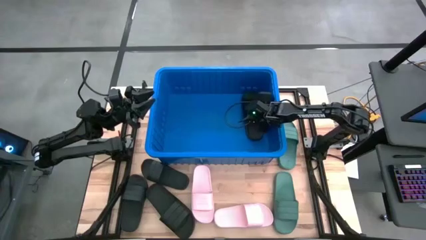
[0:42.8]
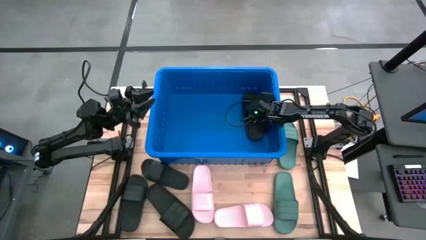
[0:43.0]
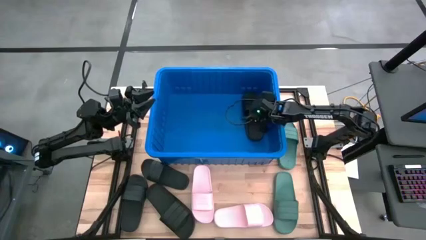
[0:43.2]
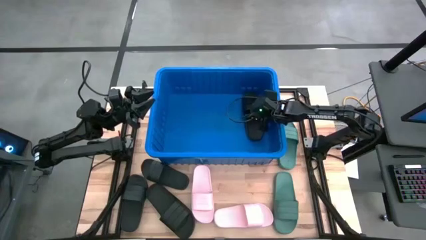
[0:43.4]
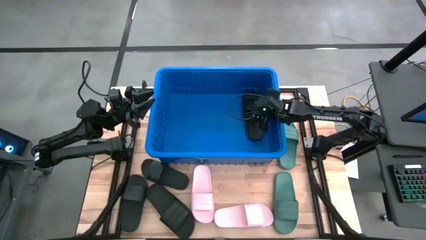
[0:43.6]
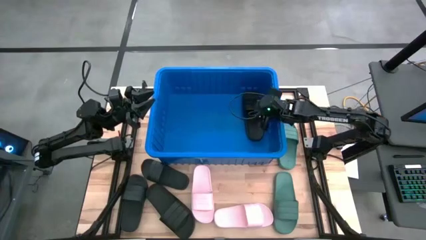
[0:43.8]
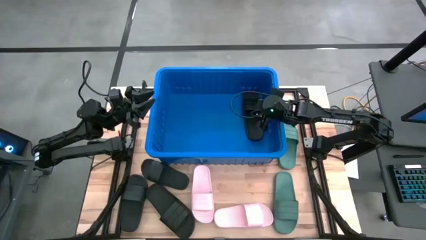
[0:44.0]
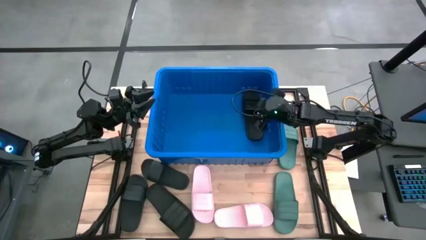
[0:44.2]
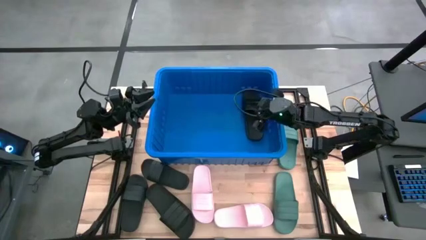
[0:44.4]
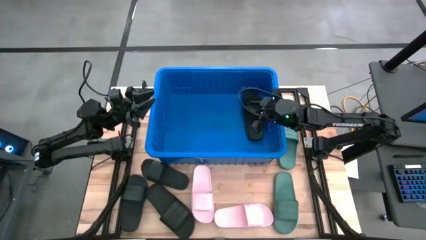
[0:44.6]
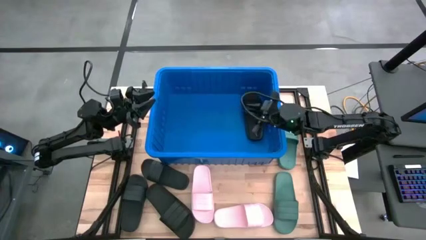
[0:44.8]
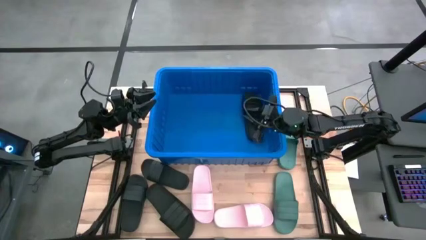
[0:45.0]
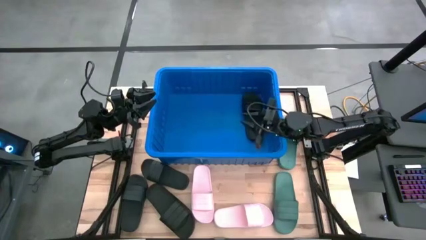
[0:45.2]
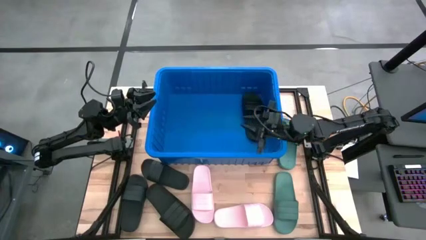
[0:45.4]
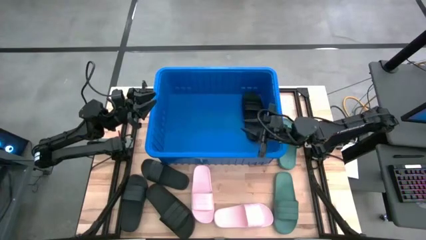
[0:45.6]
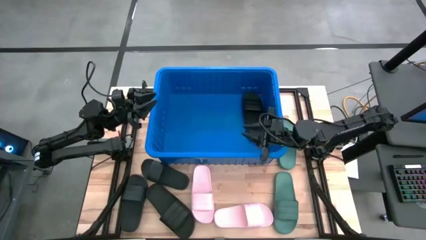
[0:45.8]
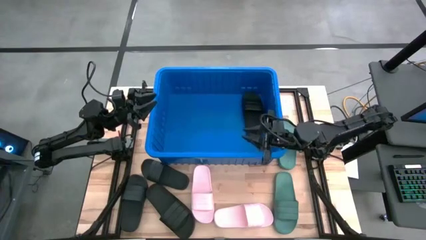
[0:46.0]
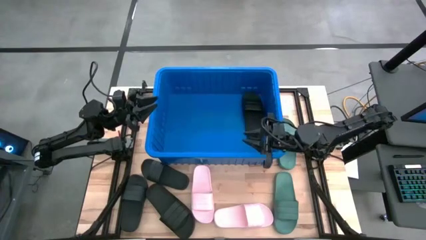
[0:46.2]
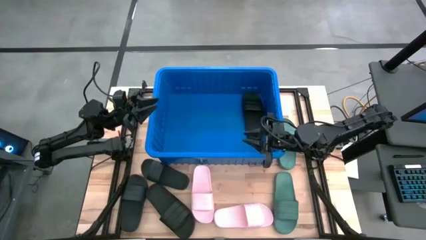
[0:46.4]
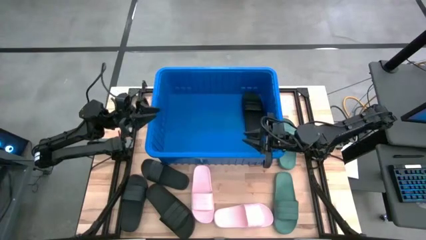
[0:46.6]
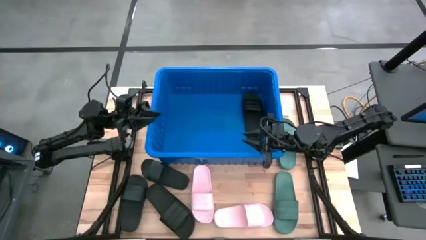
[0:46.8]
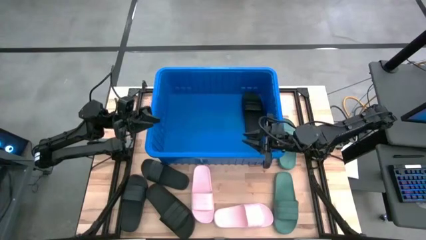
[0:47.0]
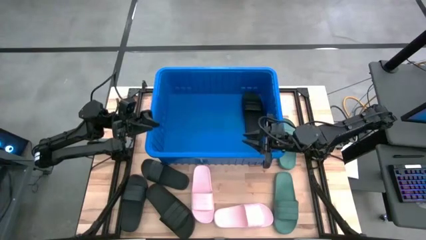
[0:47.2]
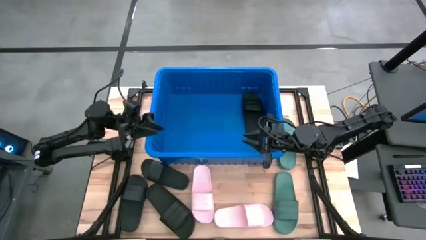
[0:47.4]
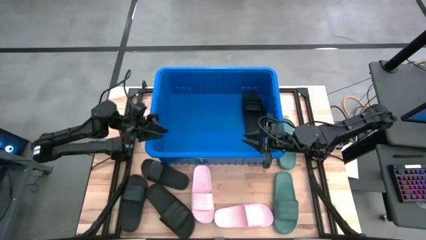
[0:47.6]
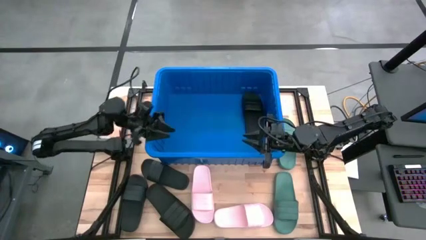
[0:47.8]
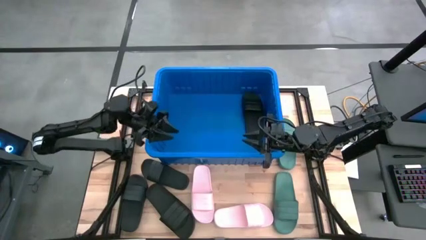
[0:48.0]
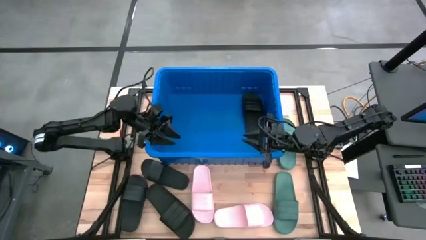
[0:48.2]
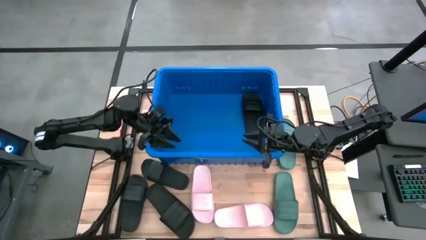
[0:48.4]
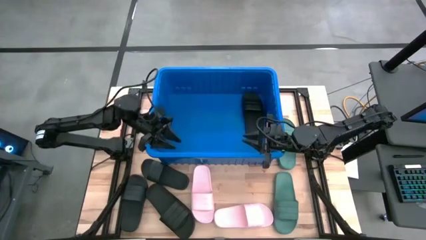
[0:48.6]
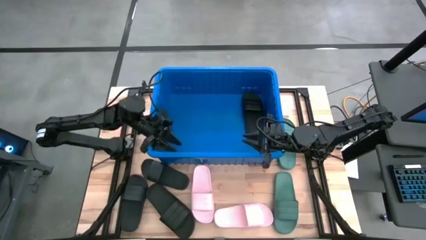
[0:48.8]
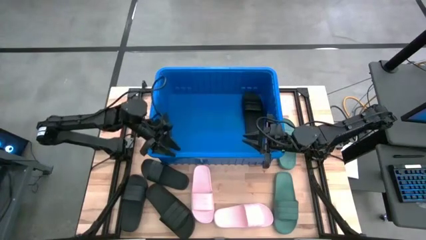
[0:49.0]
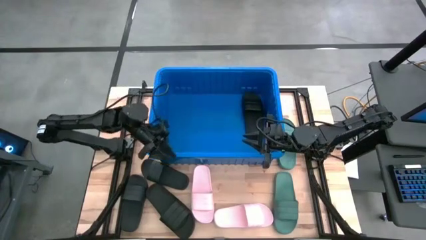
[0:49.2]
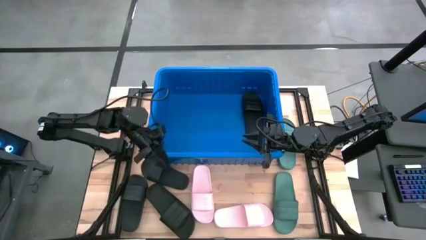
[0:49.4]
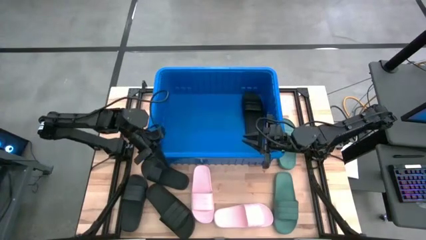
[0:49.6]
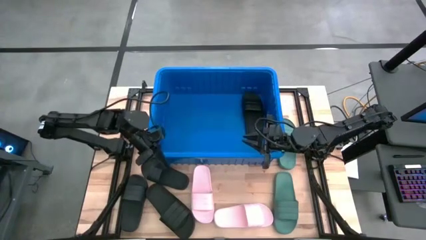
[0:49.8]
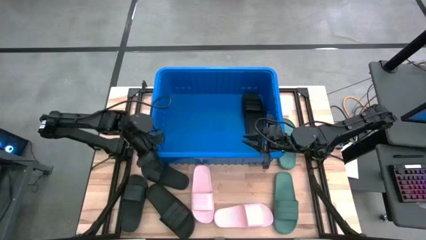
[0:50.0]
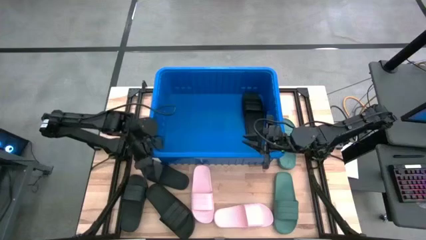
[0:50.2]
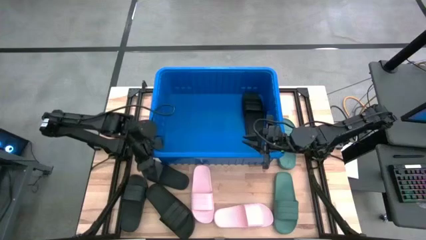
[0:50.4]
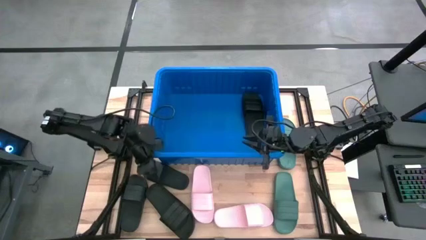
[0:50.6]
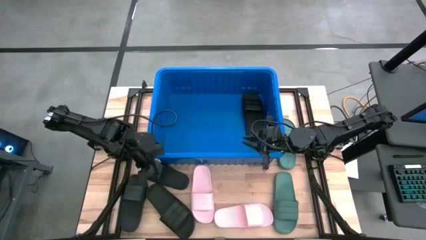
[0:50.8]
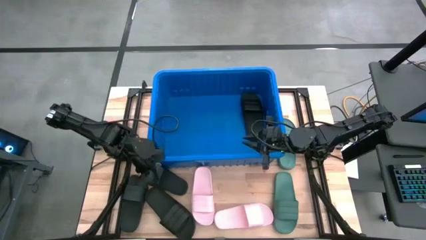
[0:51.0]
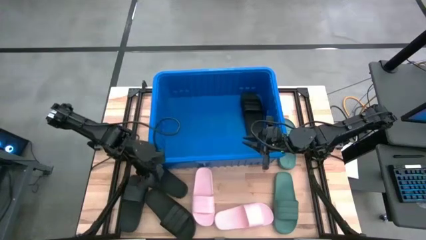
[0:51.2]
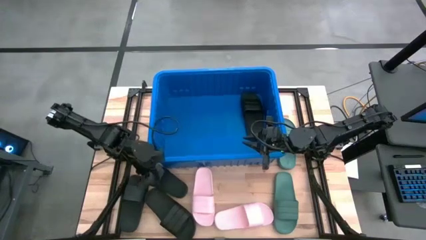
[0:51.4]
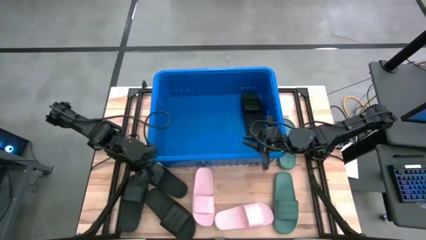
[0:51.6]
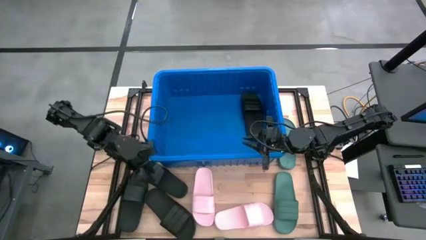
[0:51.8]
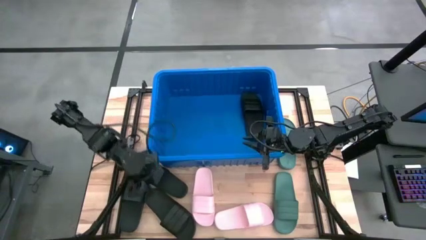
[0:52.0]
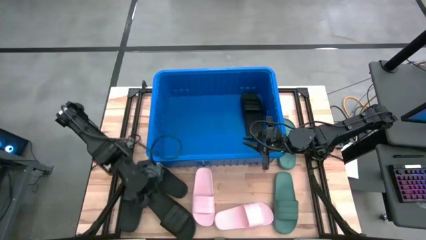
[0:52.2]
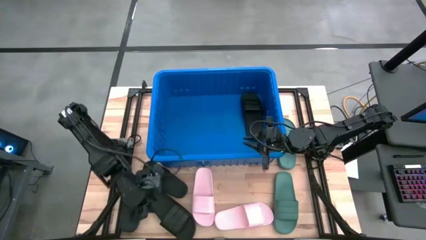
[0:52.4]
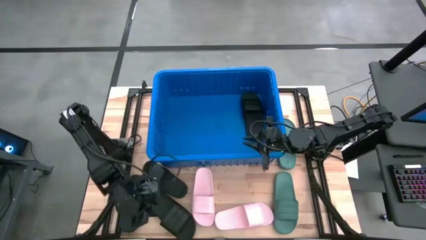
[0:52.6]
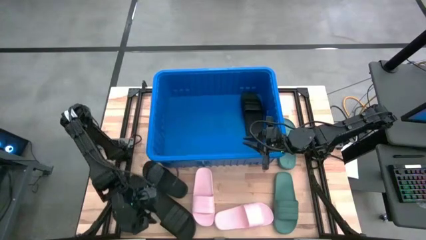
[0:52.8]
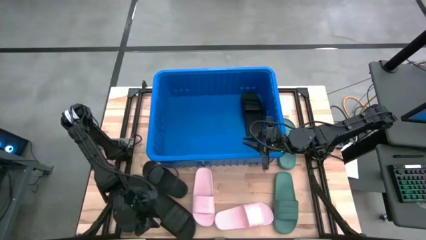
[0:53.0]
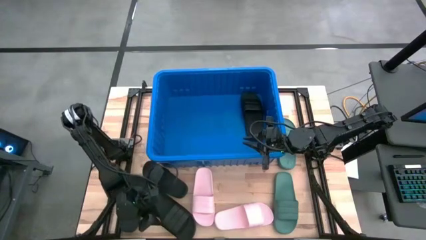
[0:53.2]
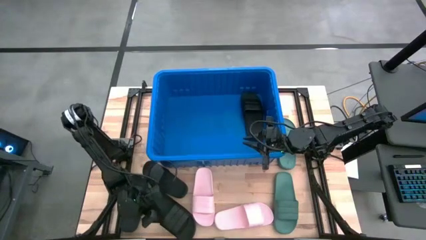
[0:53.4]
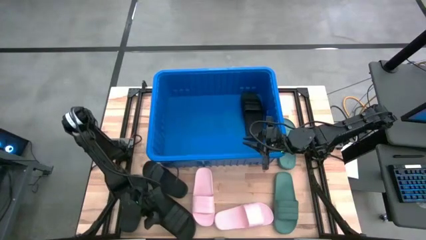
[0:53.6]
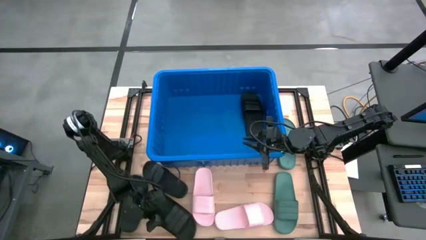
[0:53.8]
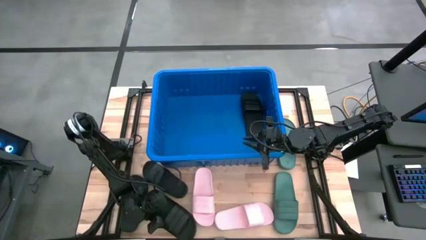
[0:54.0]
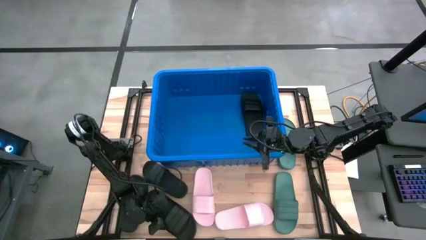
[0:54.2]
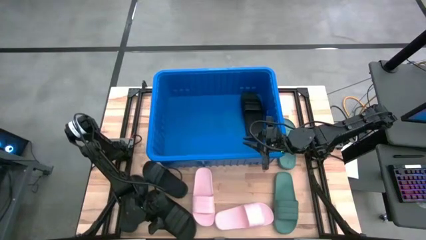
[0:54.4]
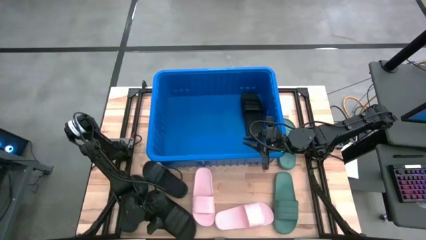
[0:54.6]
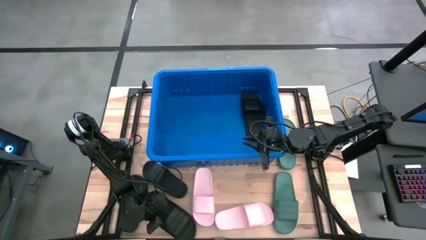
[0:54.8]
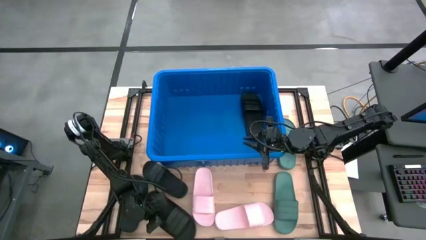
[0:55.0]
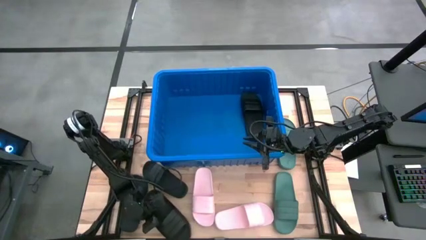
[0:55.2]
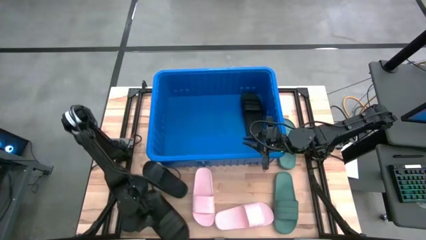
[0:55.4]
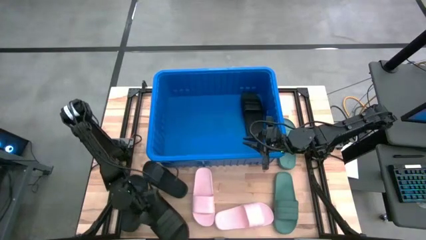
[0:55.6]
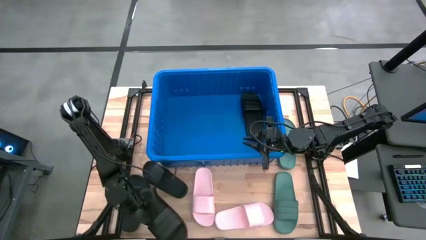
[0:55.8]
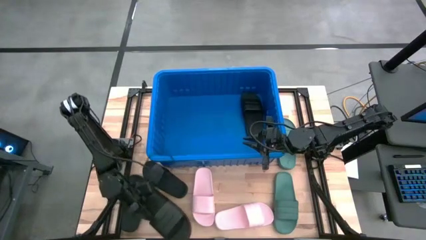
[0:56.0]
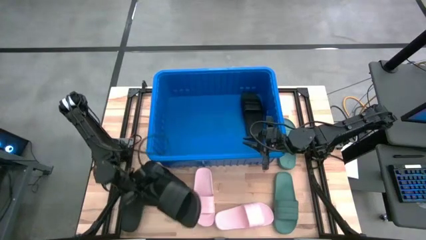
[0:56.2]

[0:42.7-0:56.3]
Task: Pick and place slides into bin
Put the black slide into the blue bin
